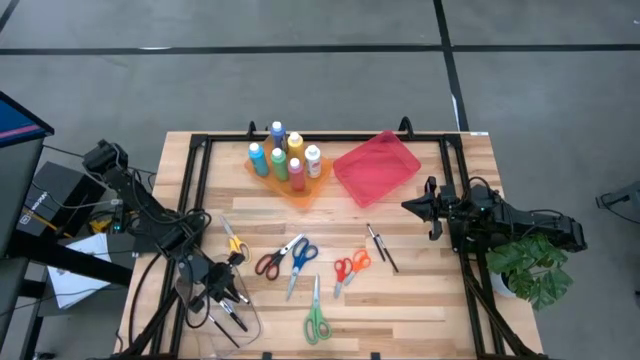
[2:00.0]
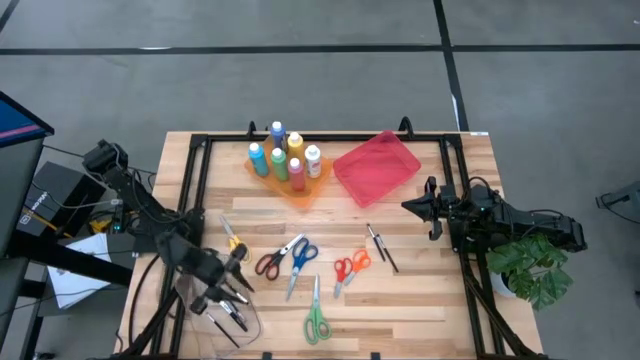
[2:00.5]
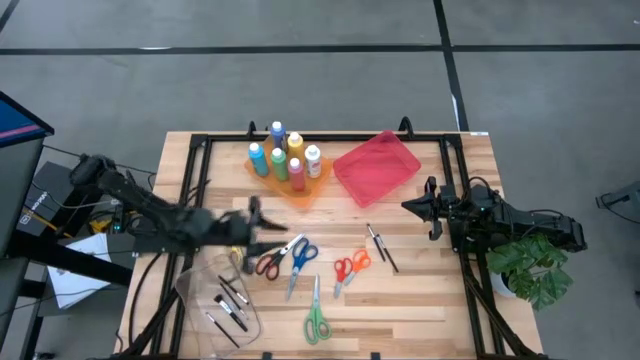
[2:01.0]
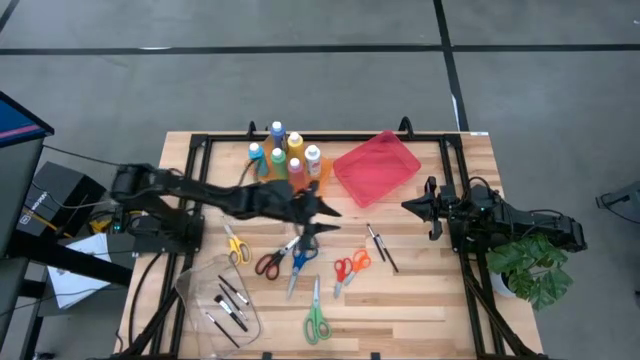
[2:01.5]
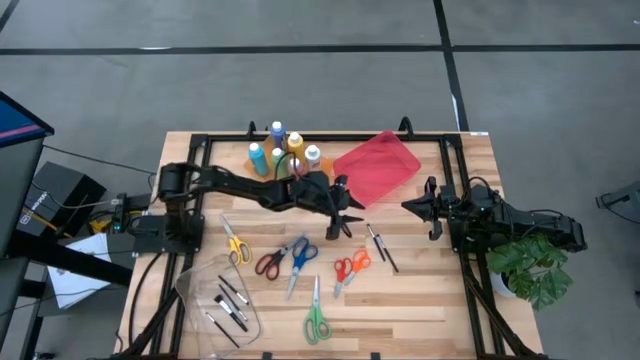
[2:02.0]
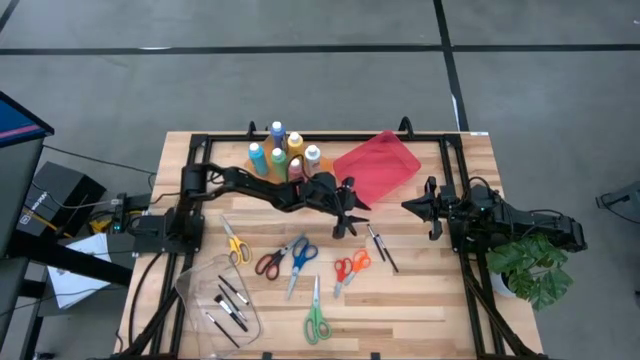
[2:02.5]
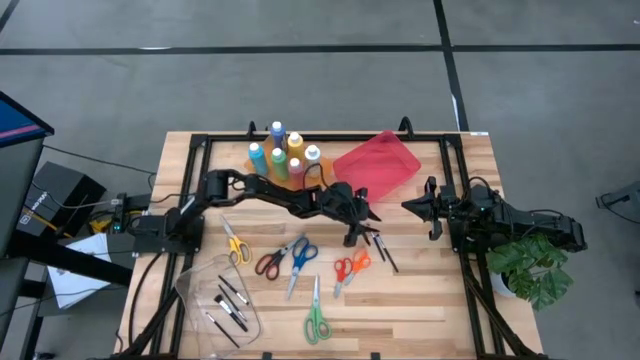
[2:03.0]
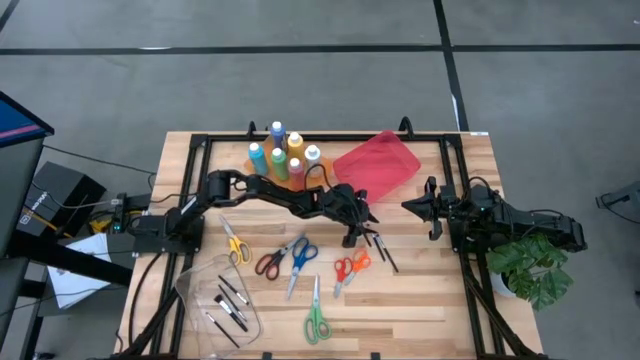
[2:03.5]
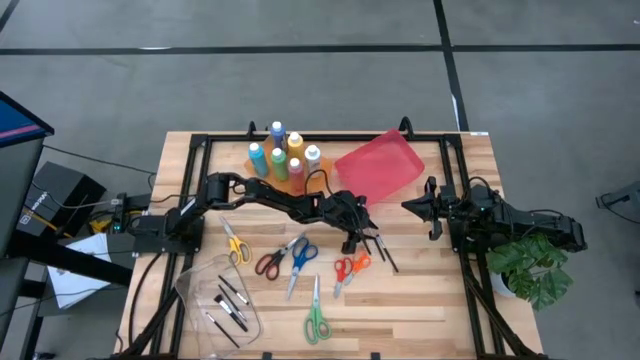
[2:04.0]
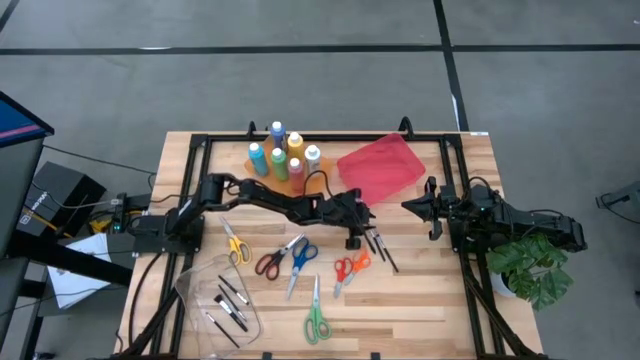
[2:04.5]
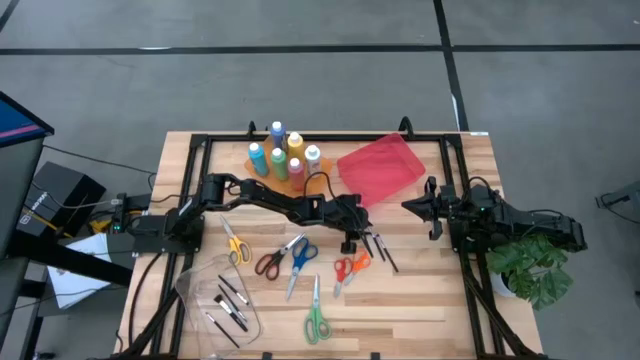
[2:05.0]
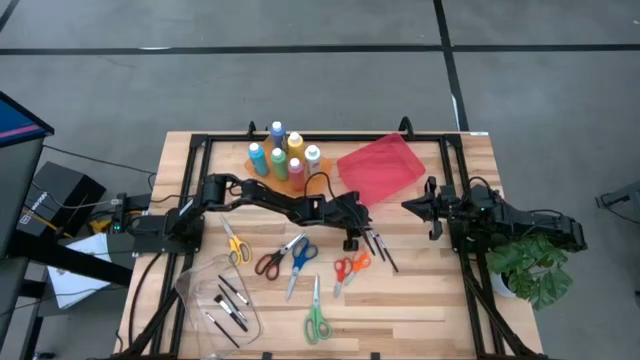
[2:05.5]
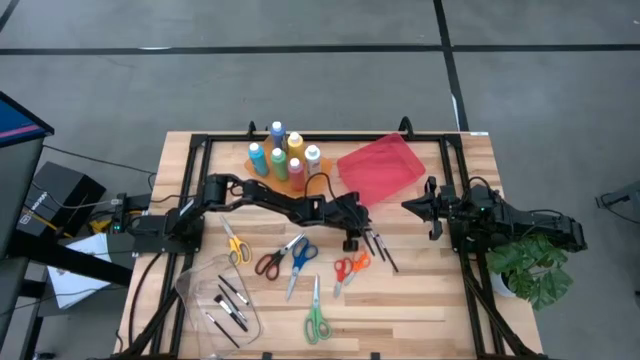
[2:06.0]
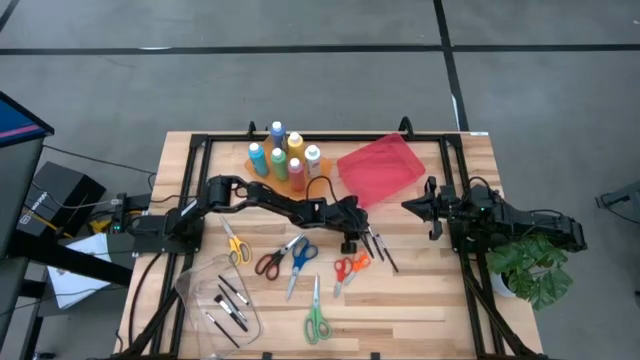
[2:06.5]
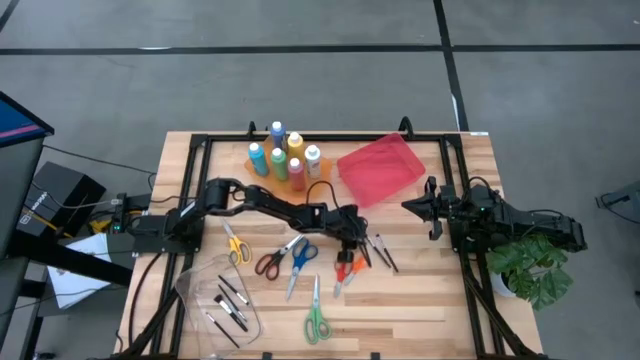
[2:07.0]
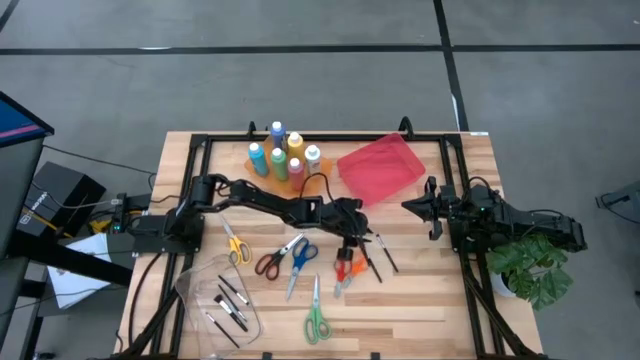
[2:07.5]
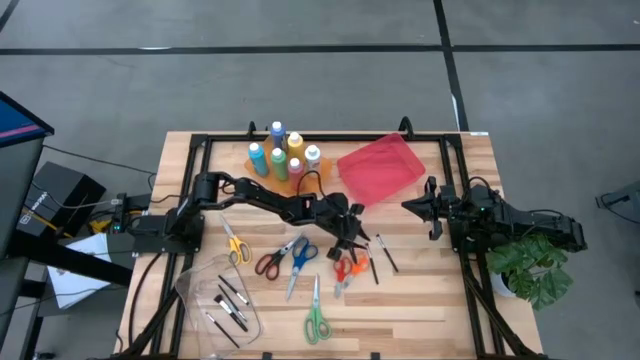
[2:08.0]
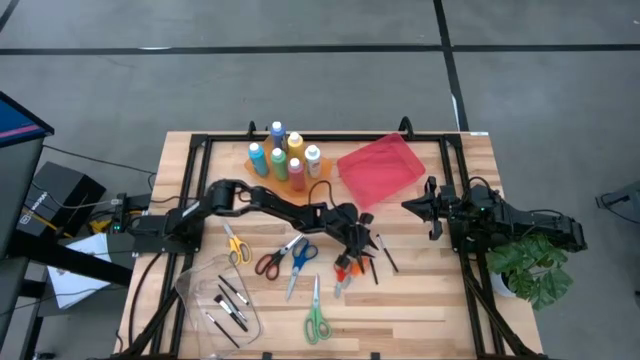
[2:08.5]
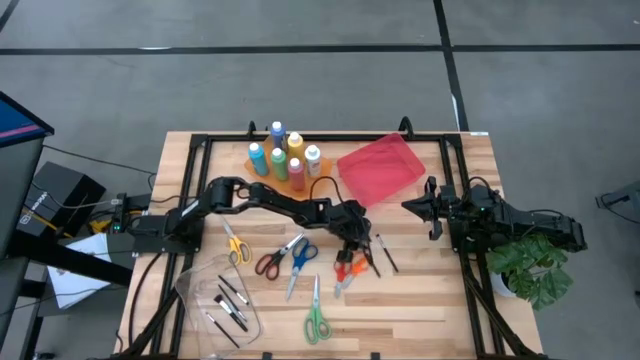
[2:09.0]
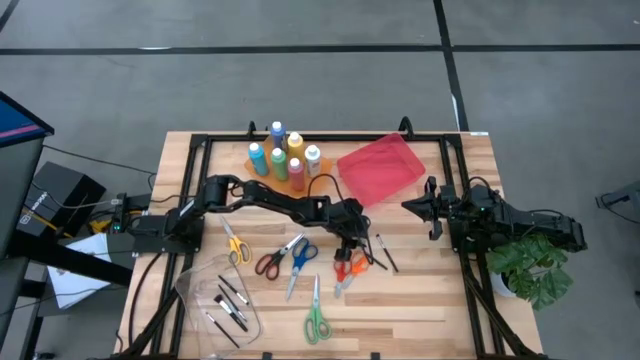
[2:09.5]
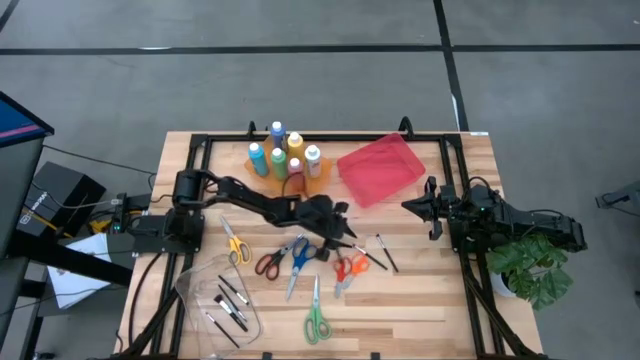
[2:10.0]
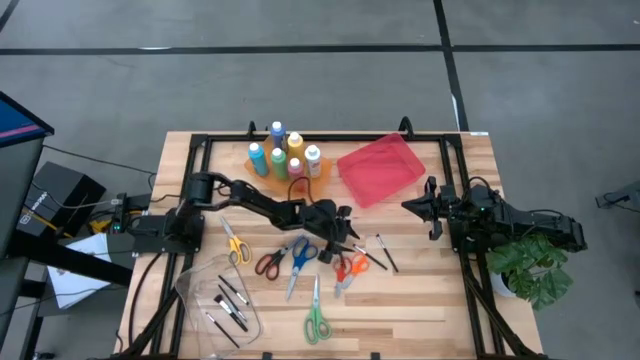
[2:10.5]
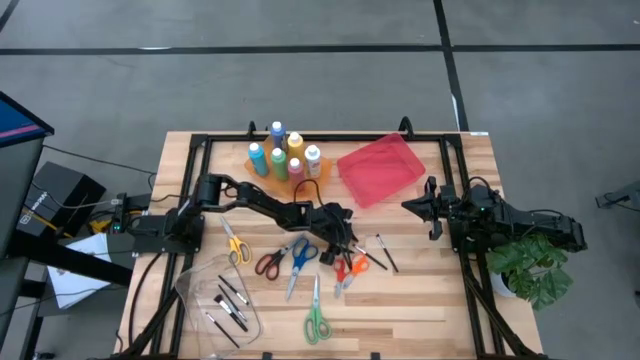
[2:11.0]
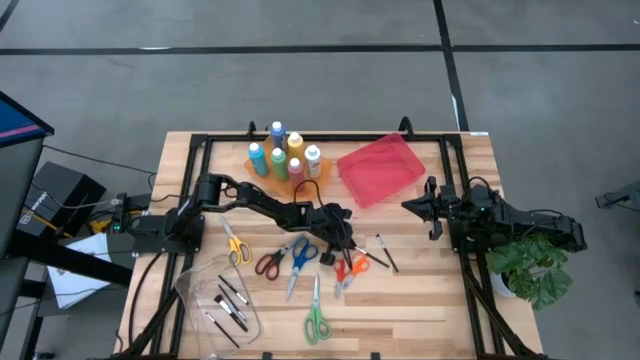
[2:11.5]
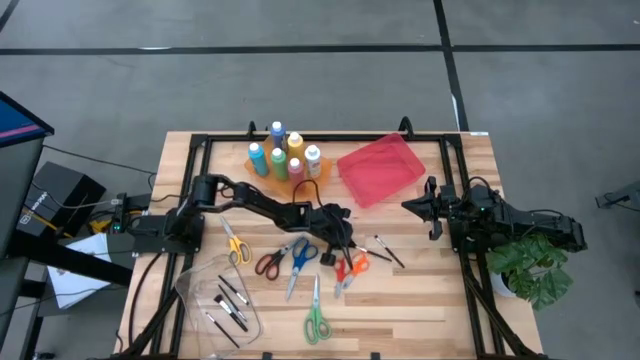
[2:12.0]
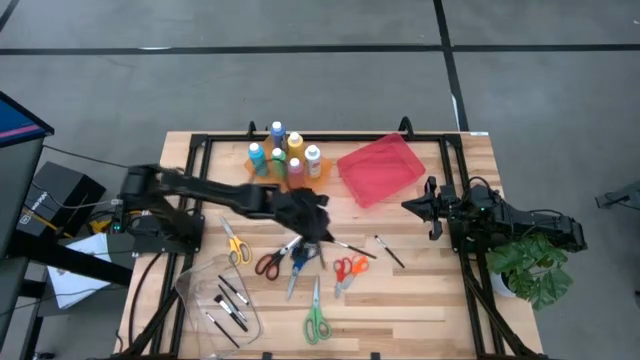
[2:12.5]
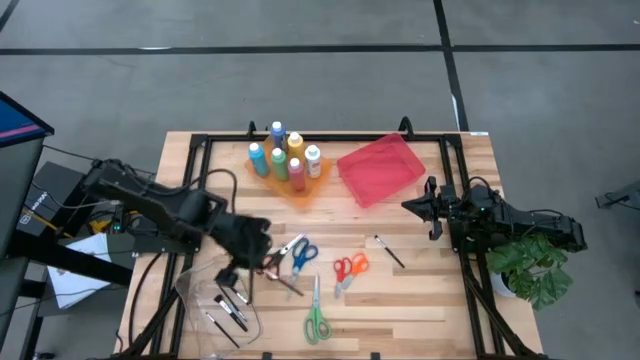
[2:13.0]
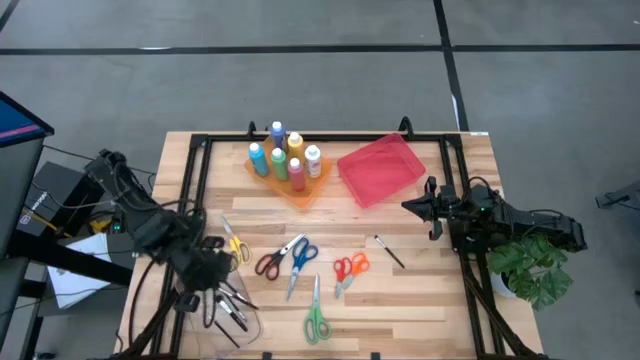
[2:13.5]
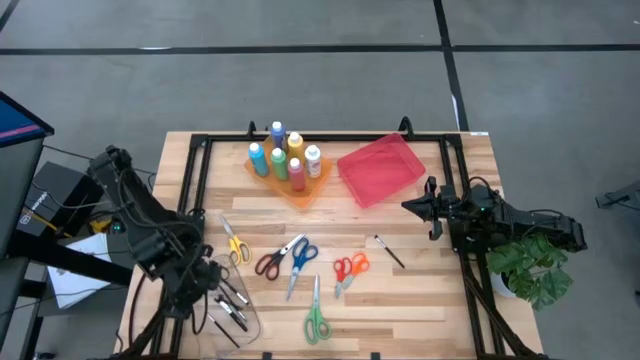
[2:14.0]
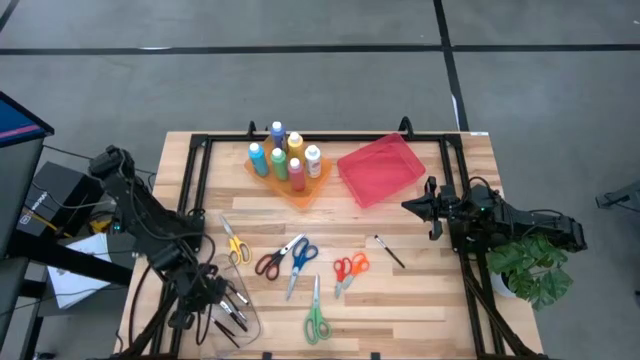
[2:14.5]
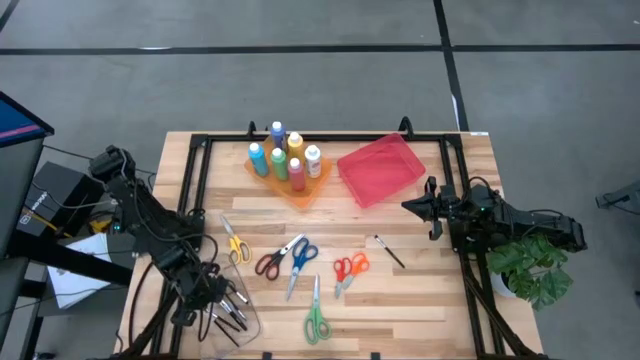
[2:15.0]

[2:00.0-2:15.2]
Task: Pick & Place Paint Supplies
Put the makeup brush into the transparent bin

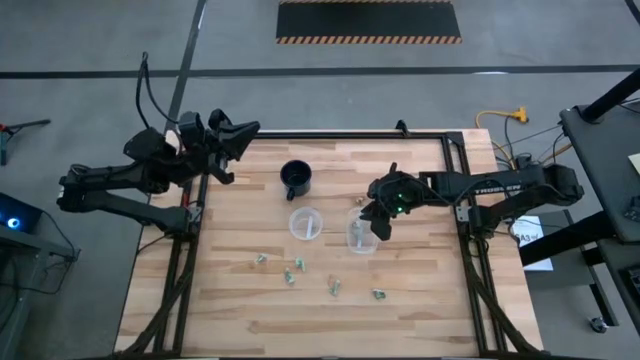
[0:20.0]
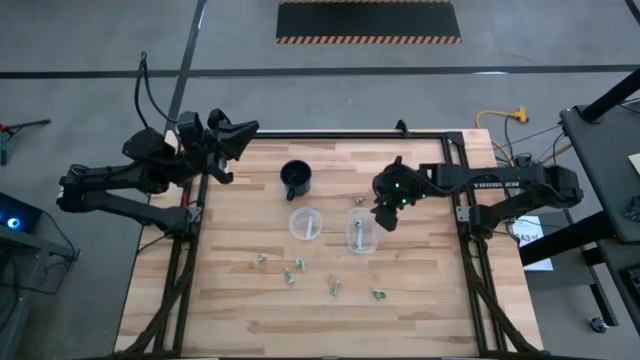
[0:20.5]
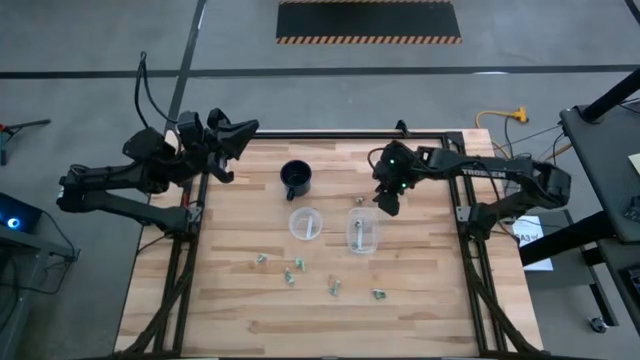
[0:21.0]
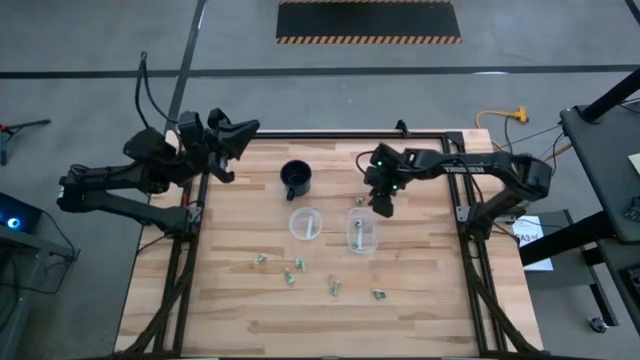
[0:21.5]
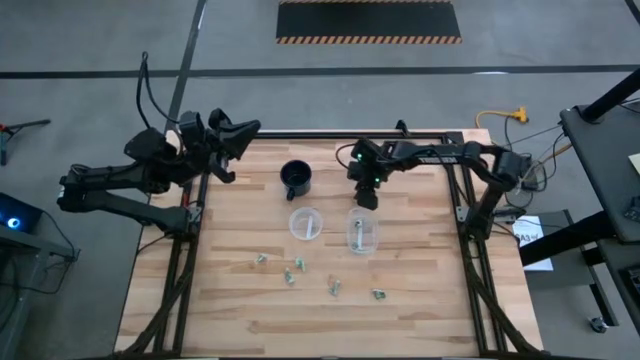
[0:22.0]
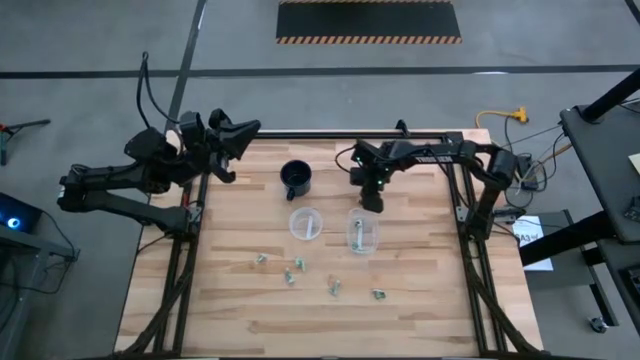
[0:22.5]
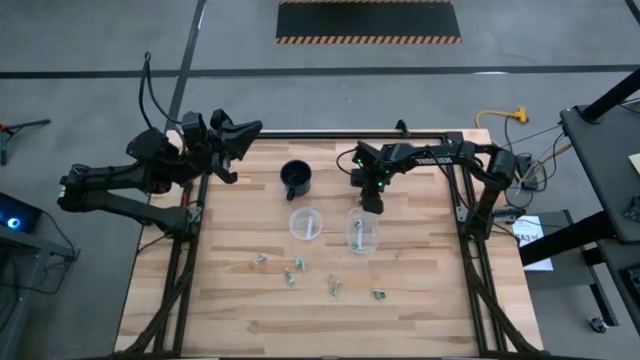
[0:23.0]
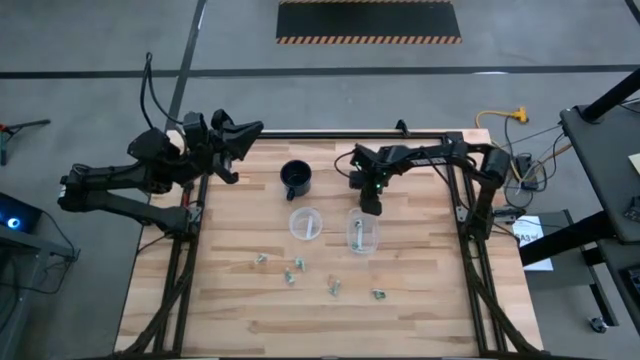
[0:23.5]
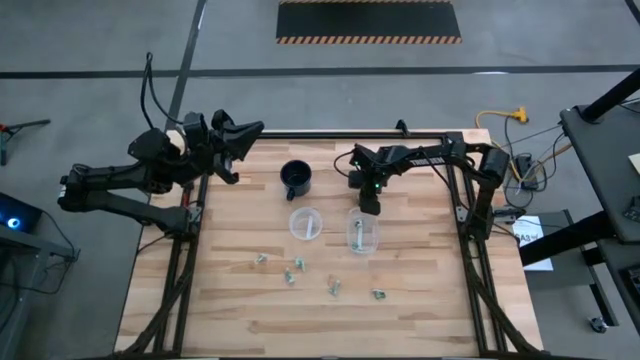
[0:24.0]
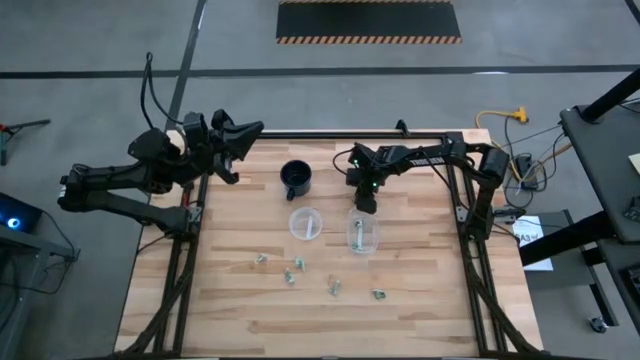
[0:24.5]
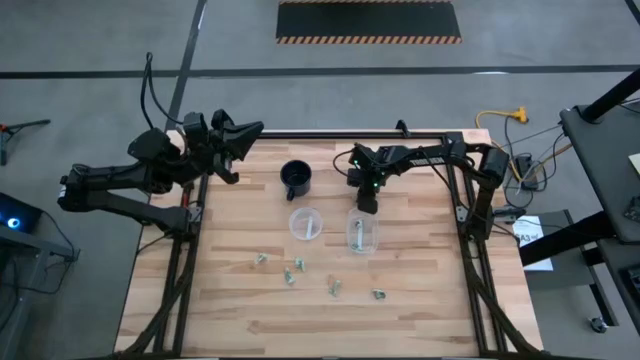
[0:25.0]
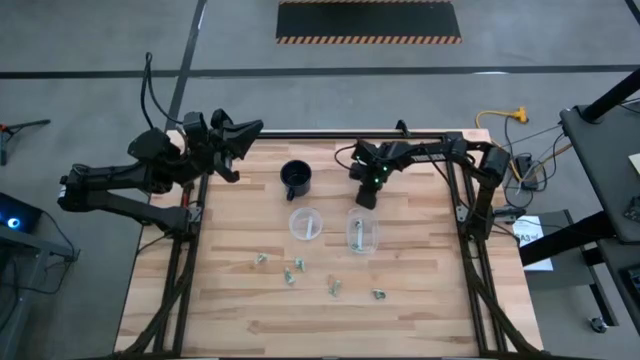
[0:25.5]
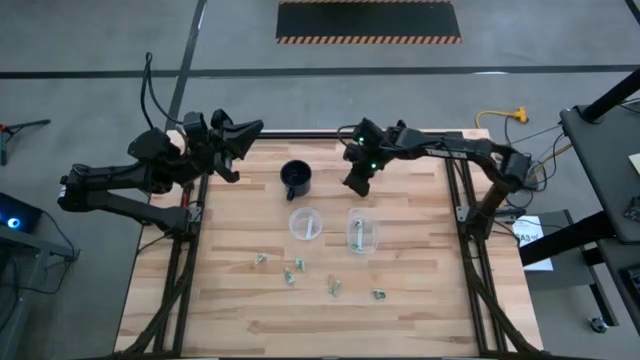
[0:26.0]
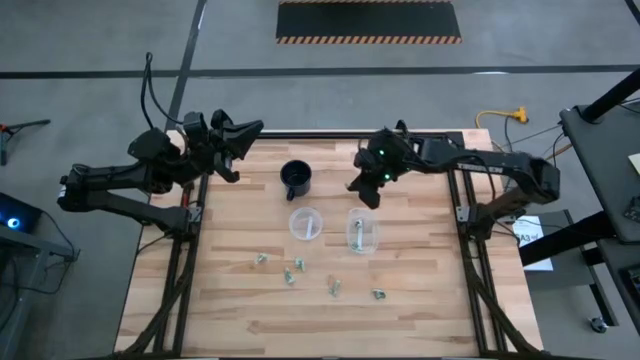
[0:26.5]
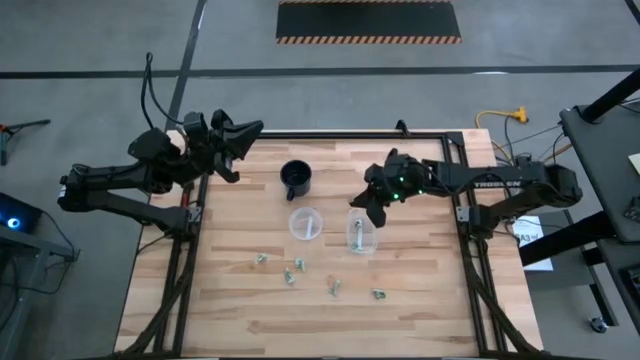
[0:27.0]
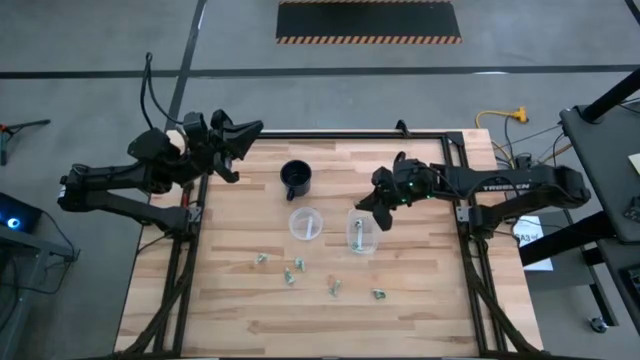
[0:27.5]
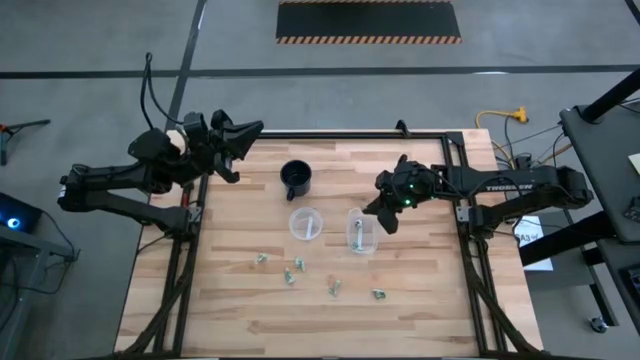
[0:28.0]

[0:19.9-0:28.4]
Task: Pick and place Stevia / Truvia into bins
Put the truvia packet into the oval transparent container
